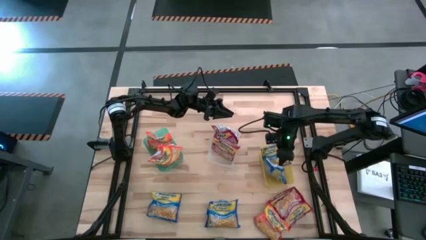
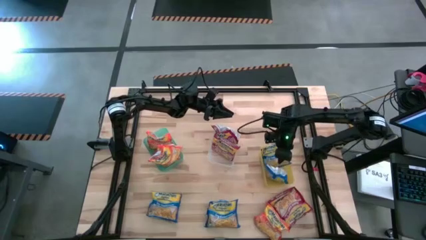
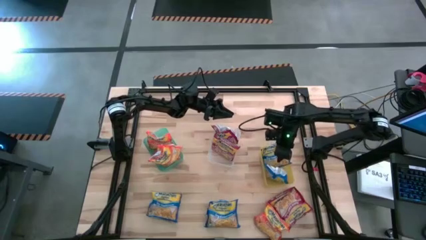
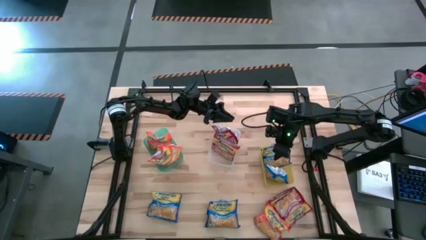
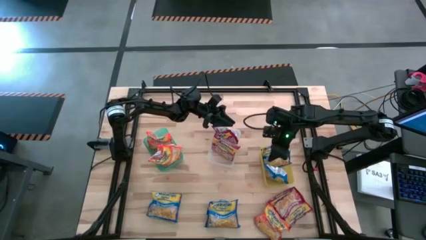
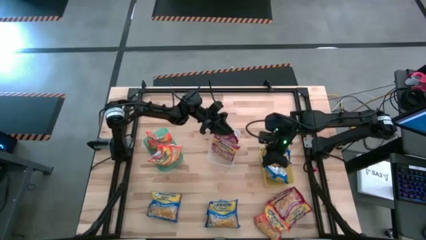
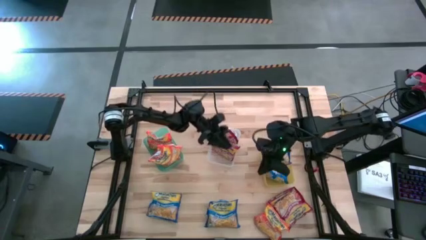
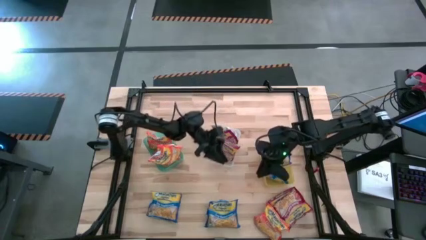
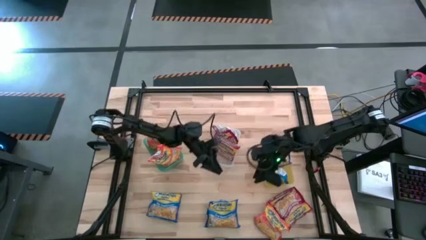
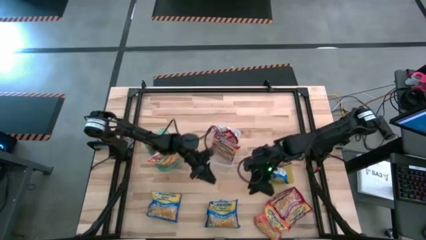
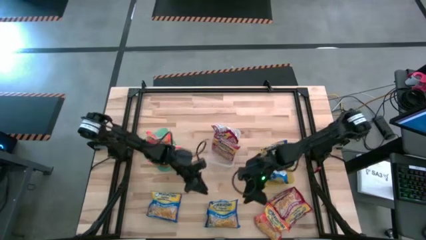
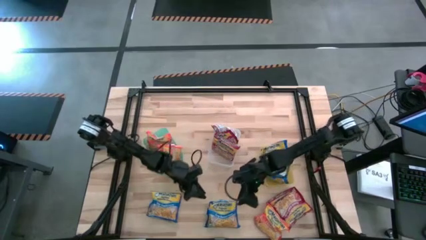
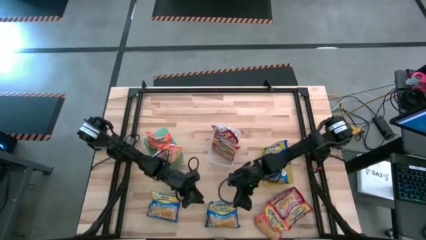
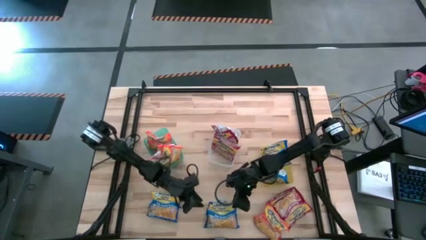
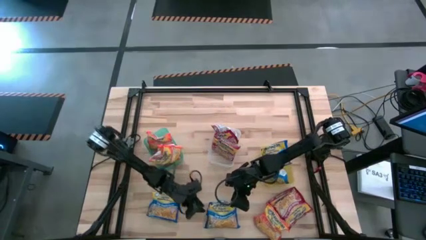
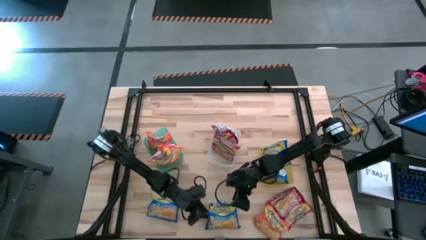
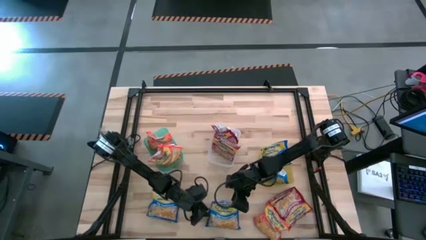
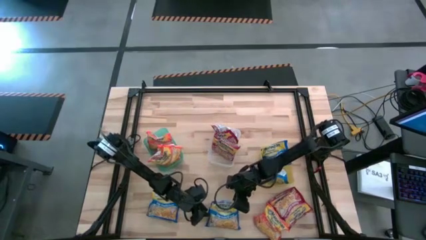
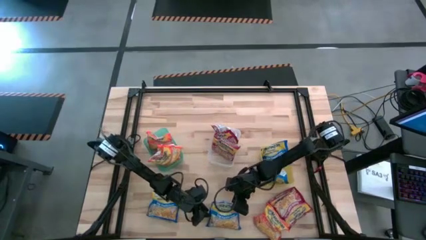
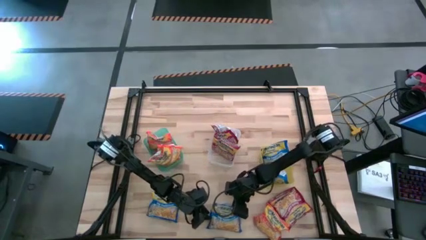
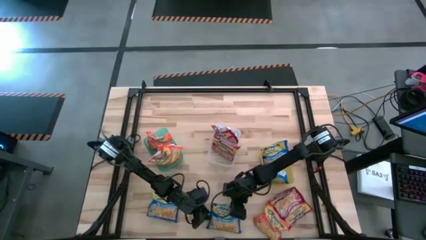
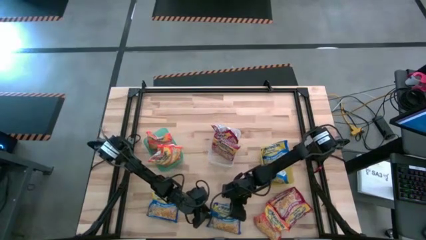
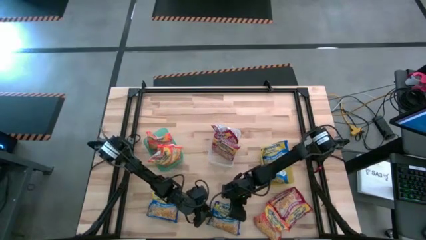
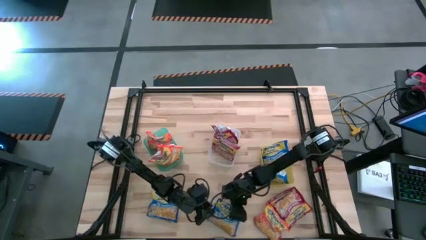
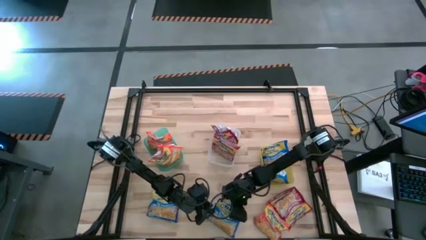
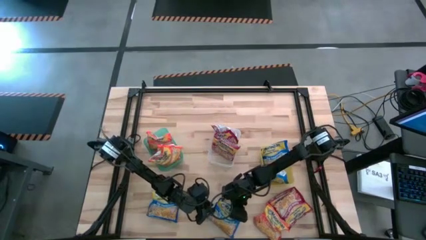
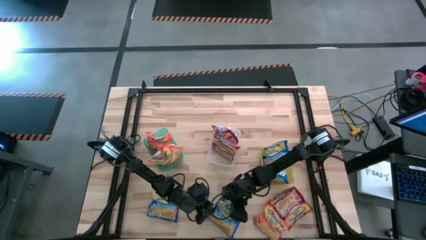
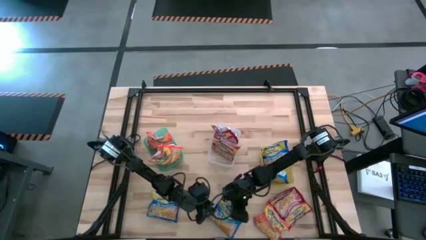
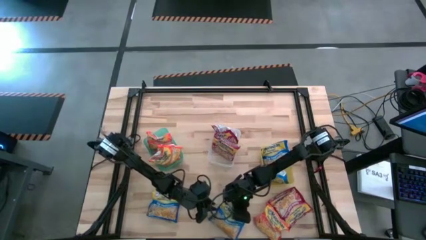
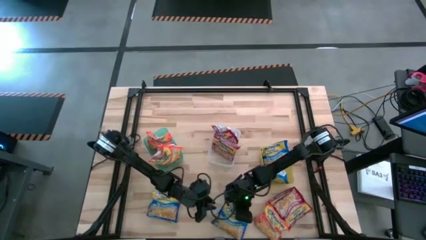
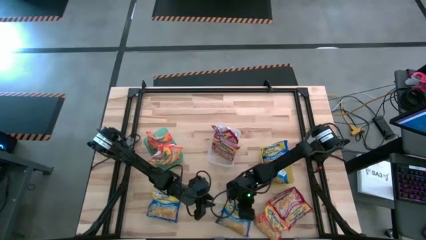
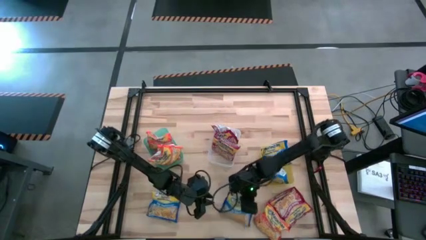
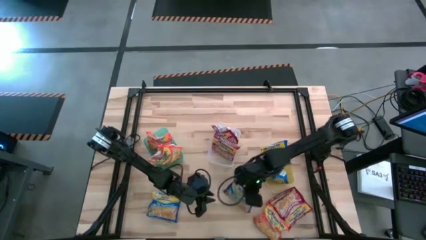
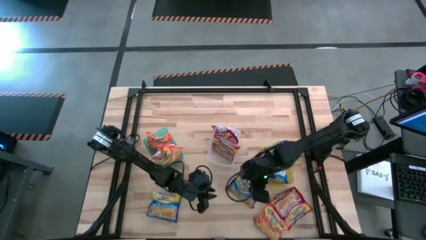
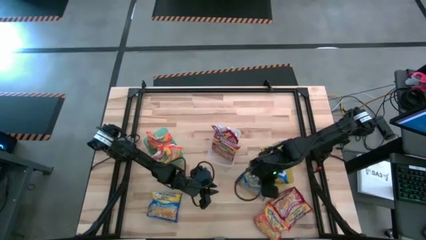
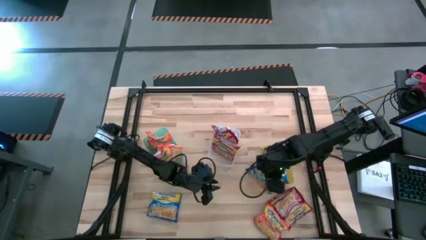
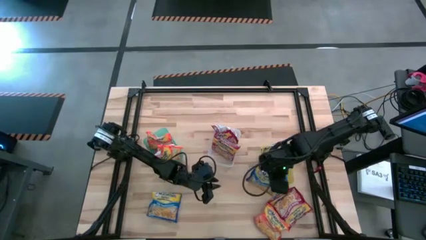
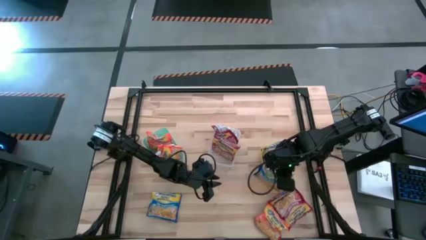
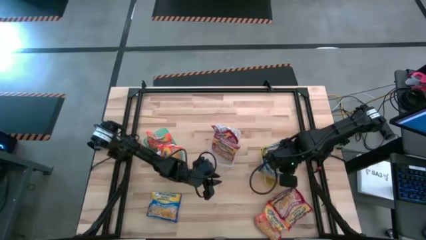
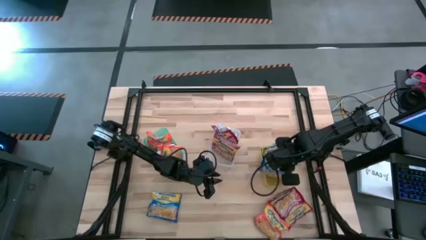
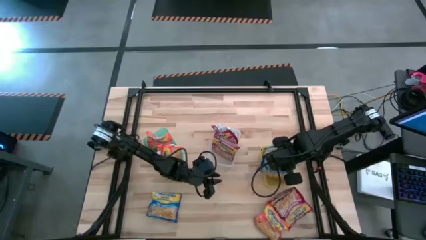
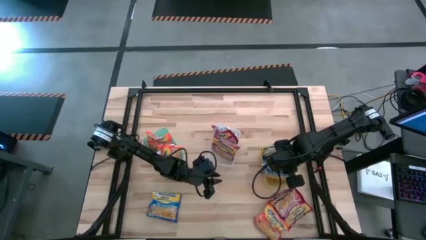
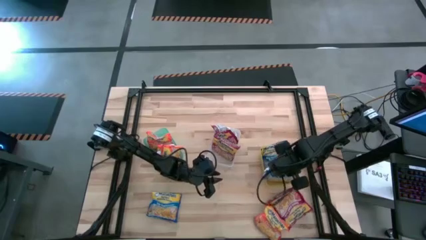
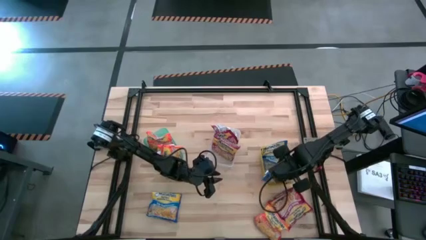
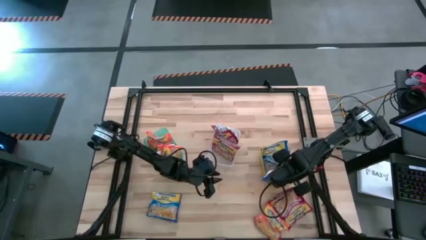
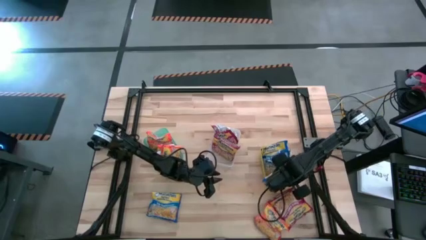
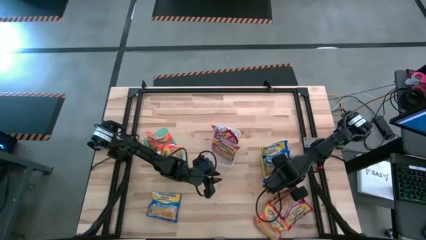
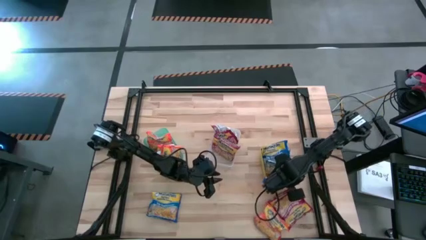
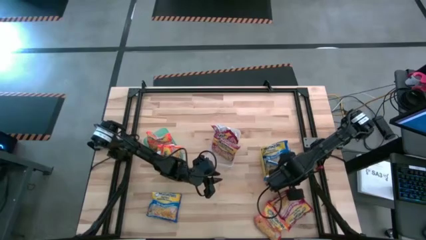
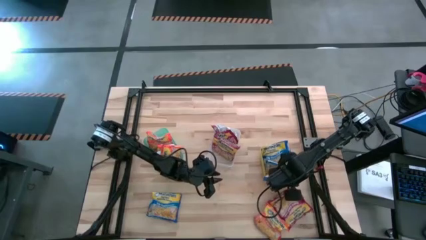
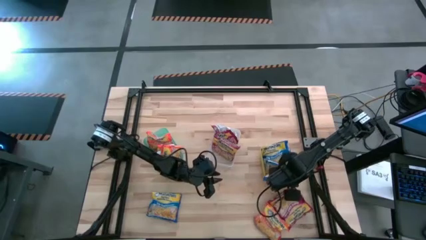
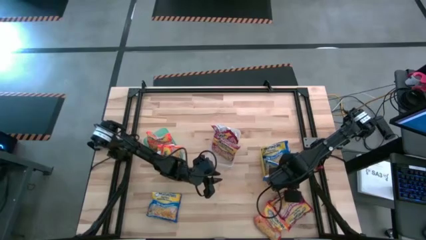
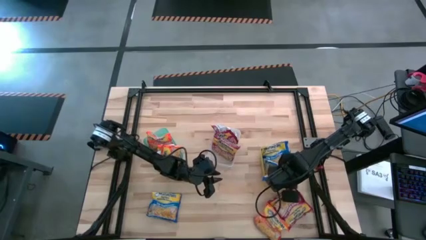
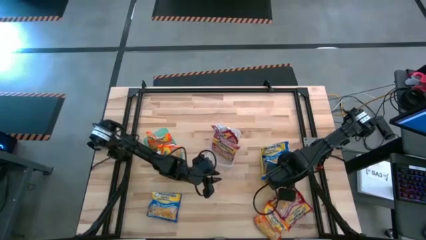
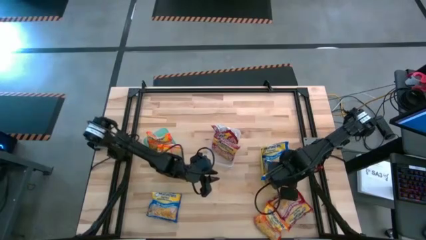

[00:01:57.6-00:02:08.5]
Task: Sort Maruchan noodles
Put the blue noodle pack into the yellow bin

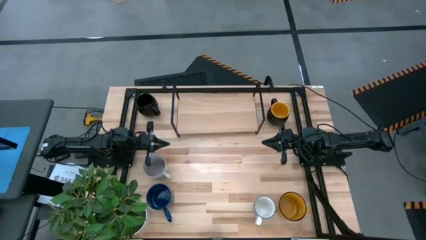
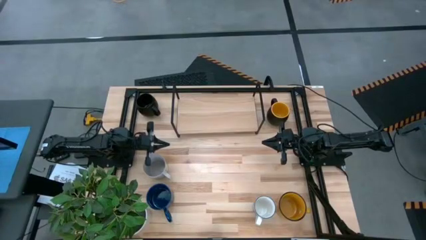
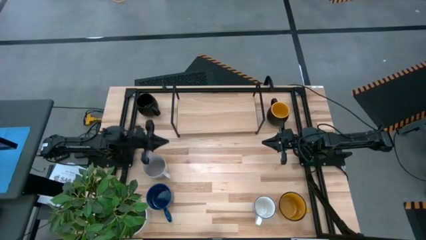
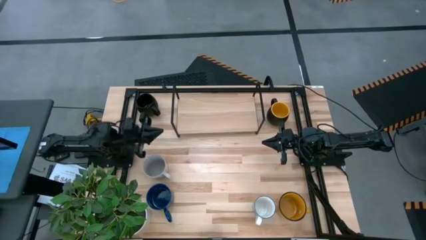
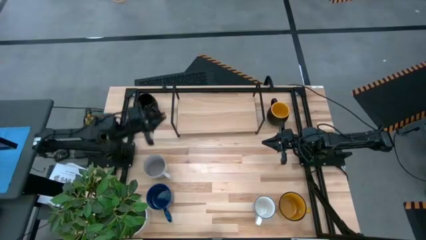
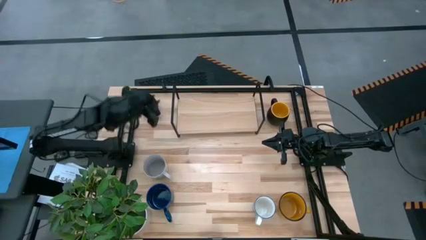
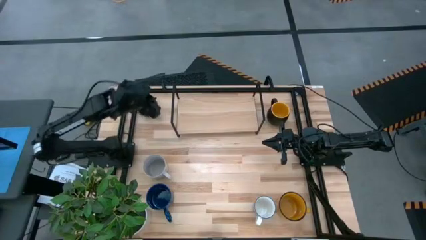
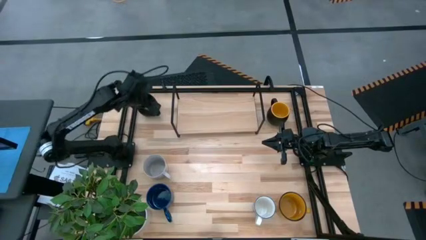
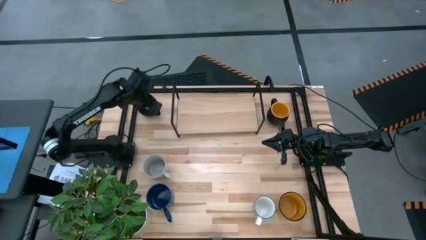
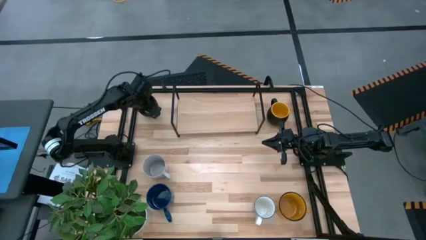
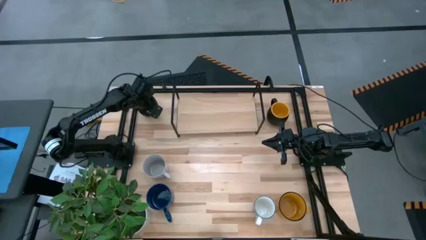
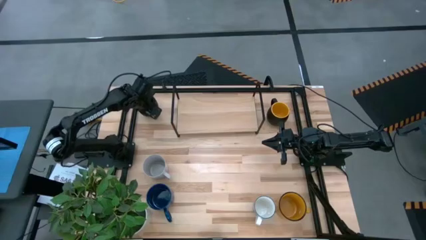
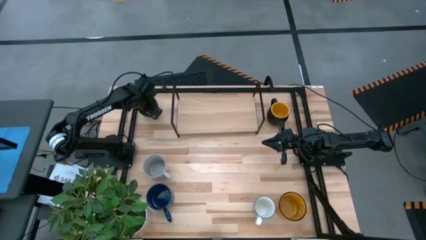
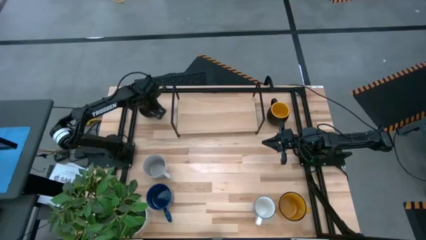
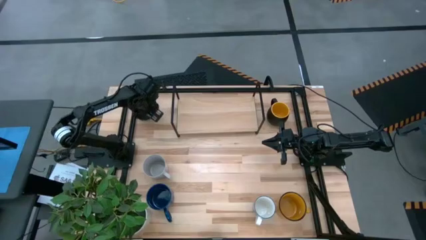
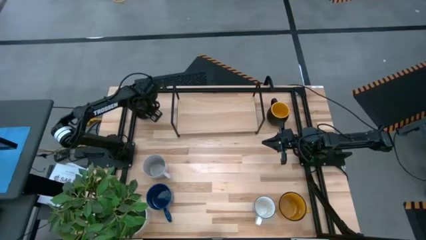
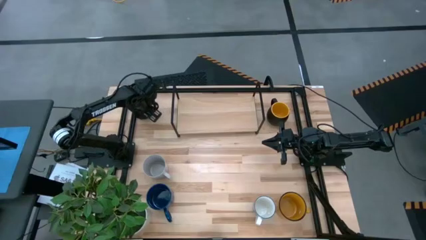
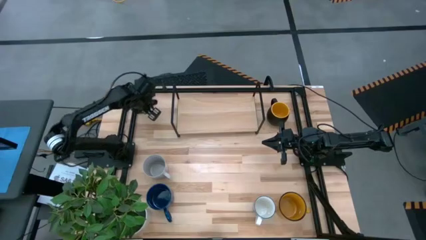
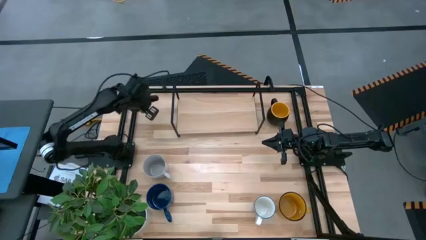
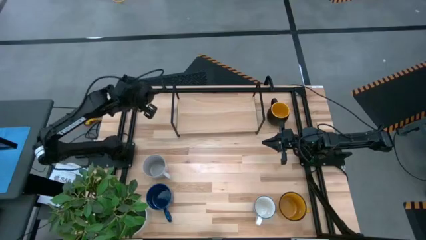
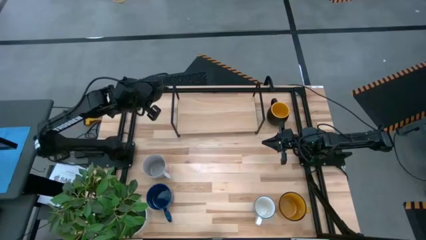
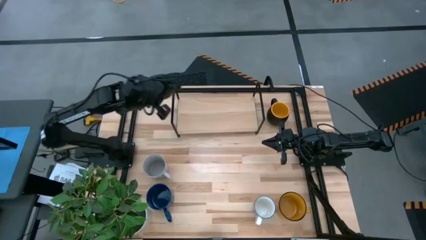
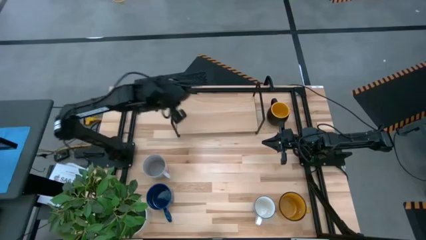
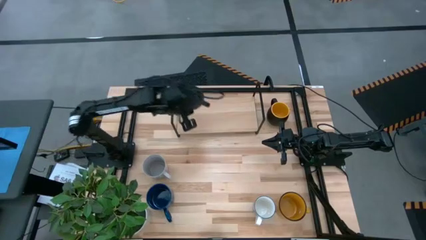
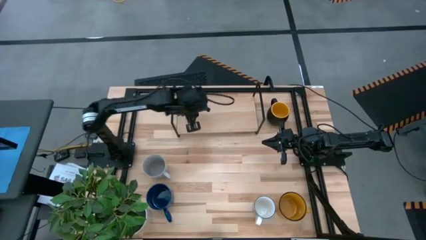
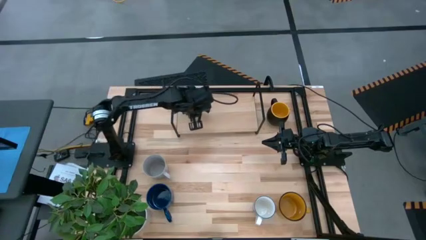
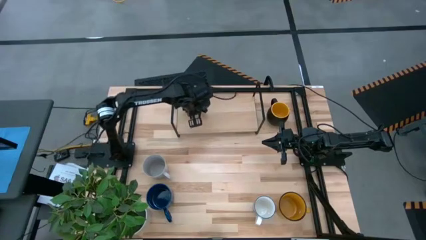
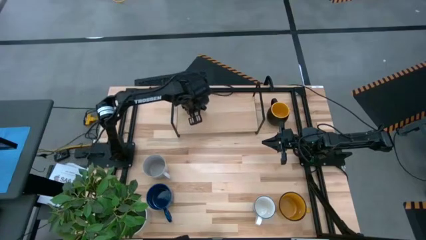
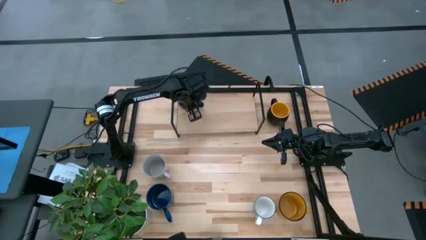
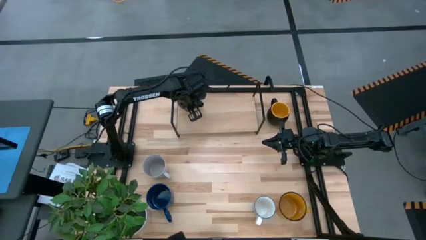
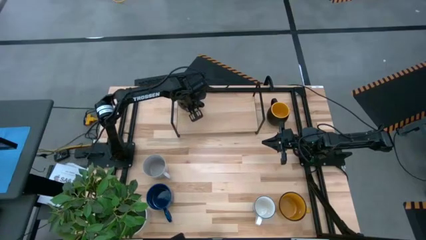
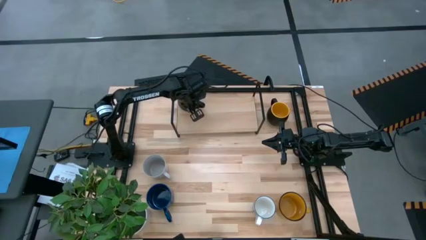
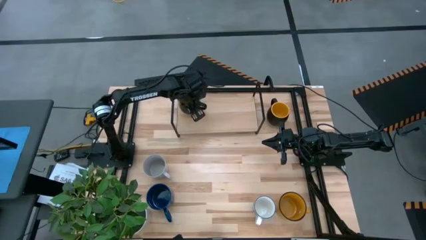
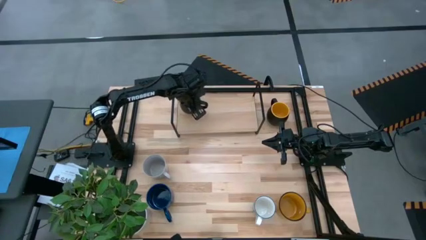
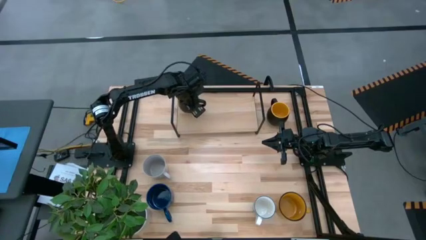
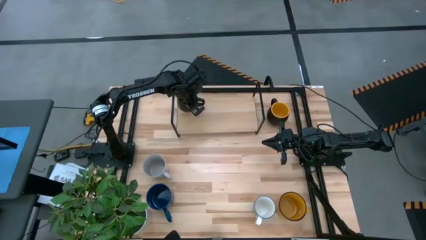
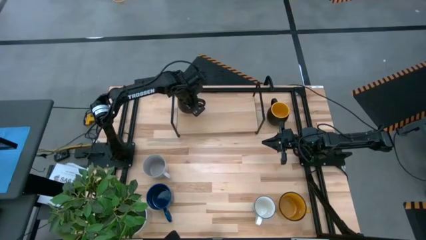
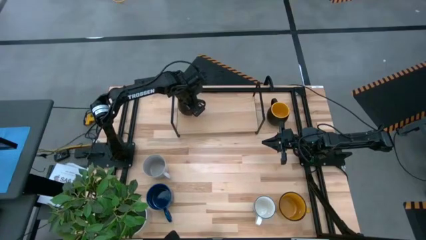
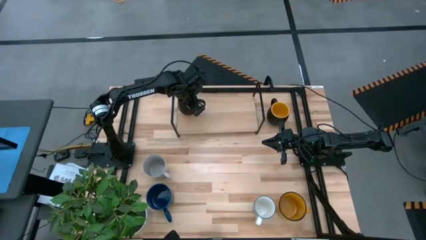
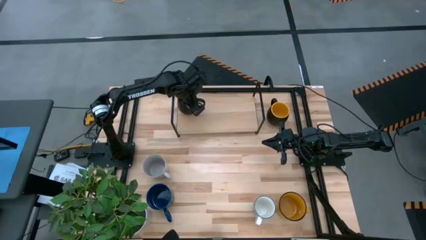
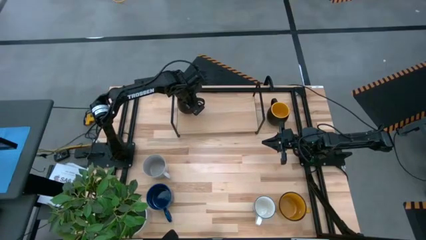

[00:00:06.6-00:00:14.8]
Task: Place coffee mugs
Put the black mug on the shelf
